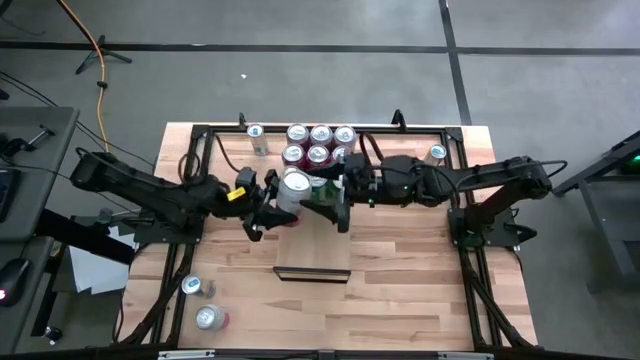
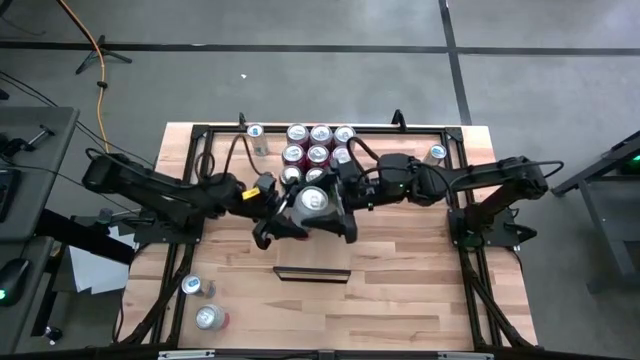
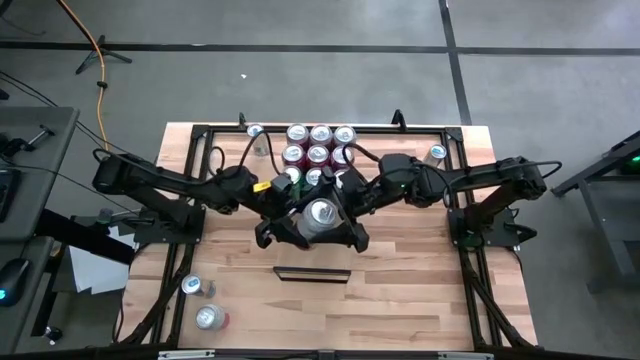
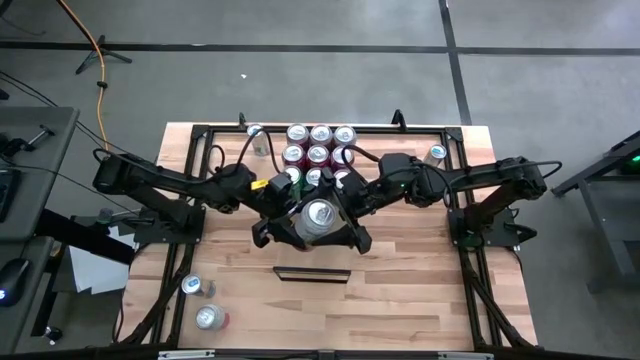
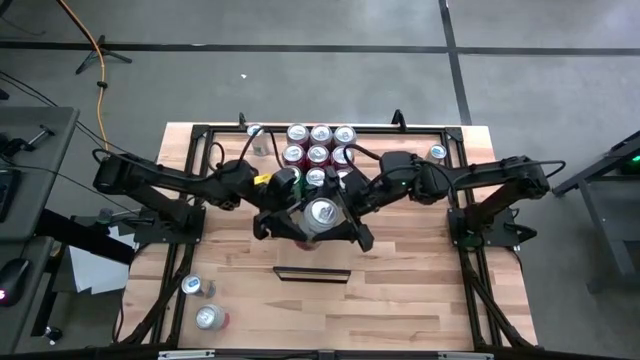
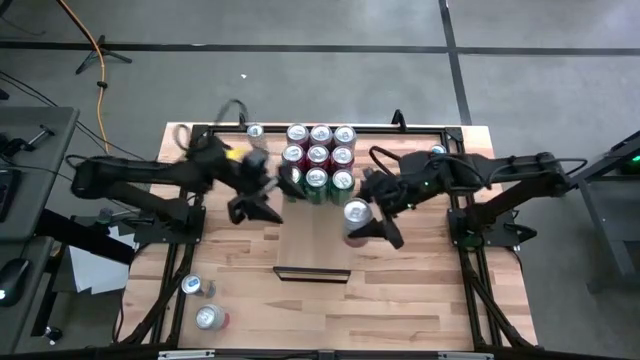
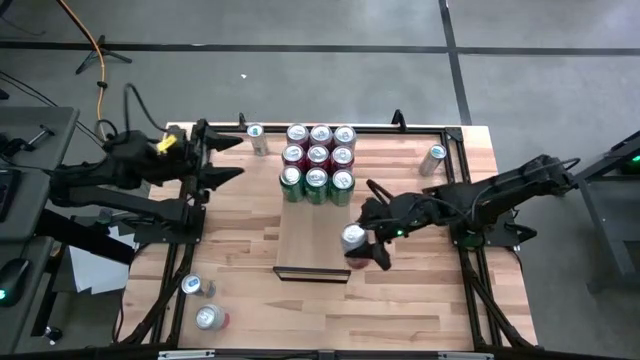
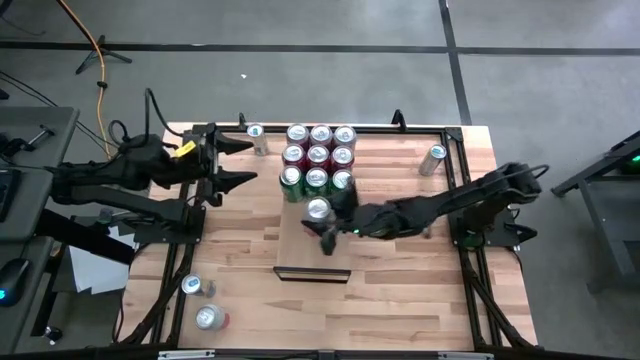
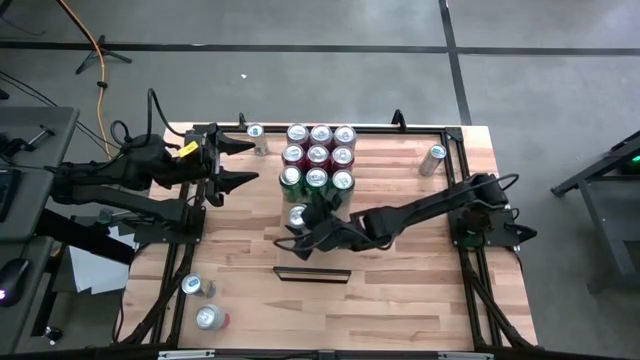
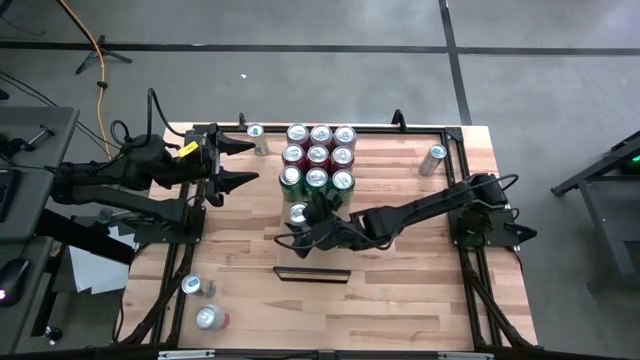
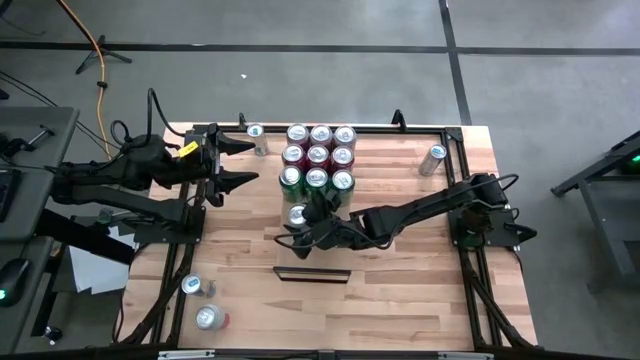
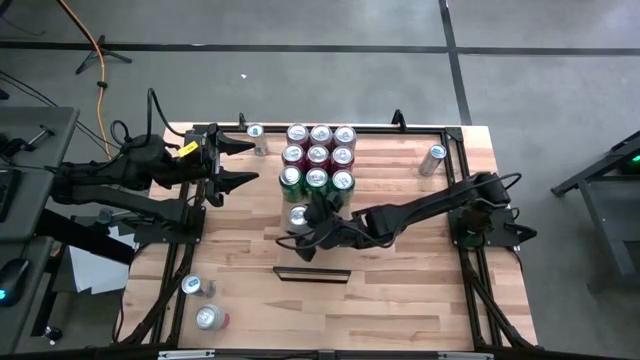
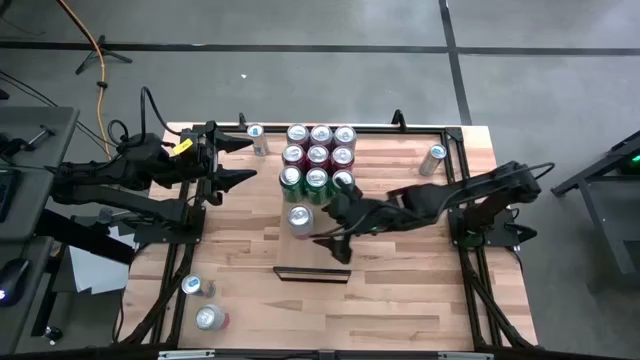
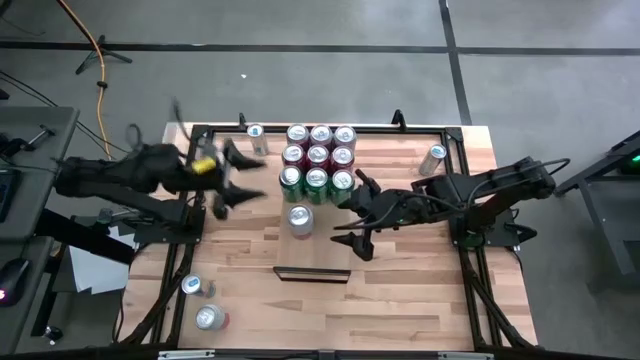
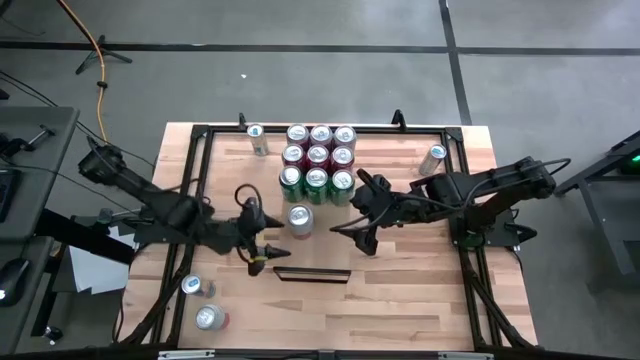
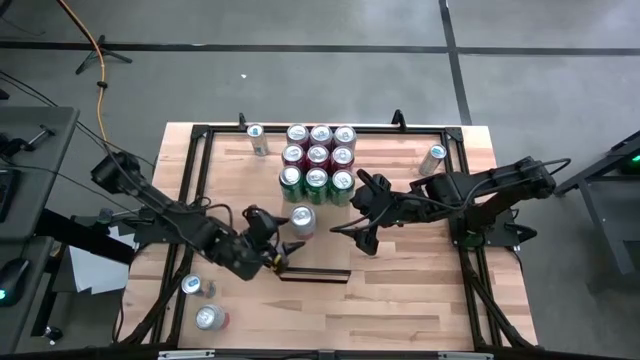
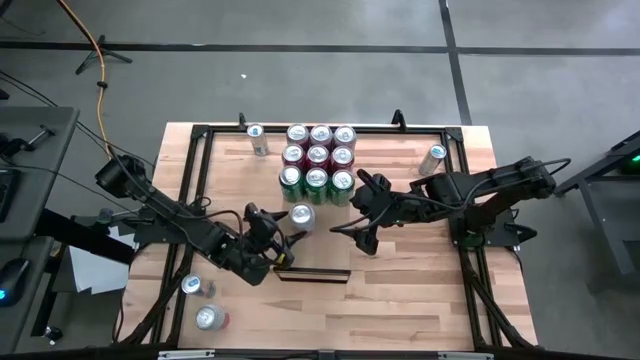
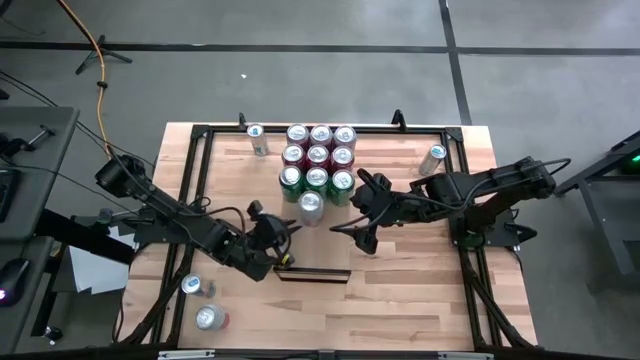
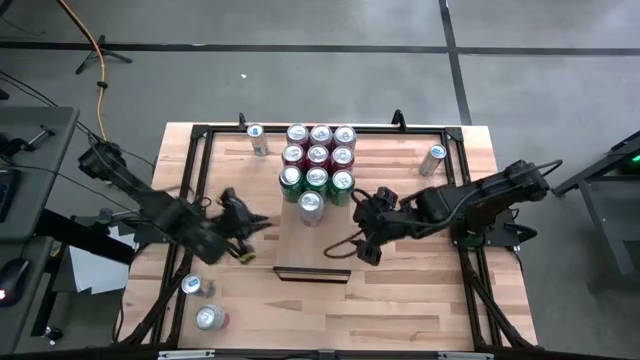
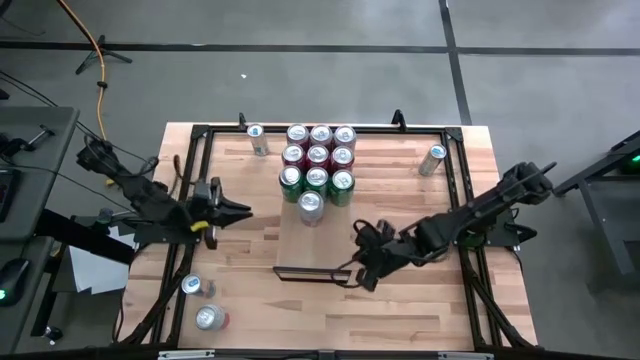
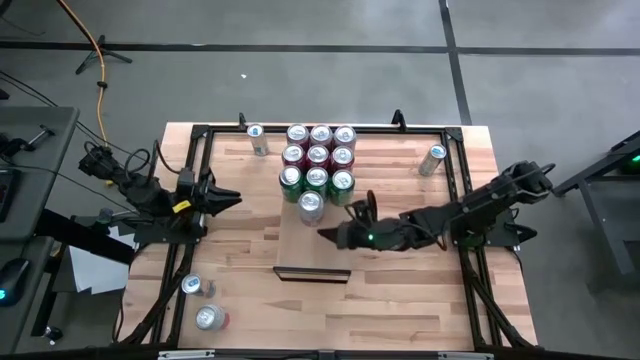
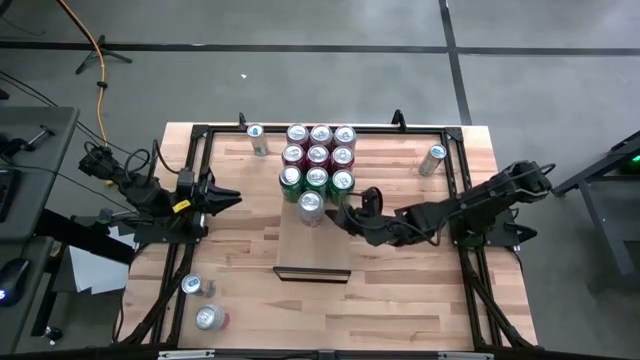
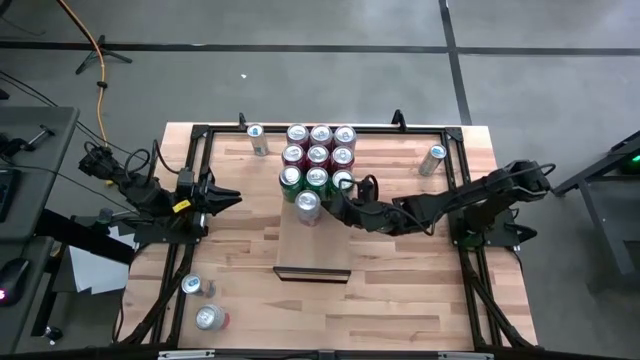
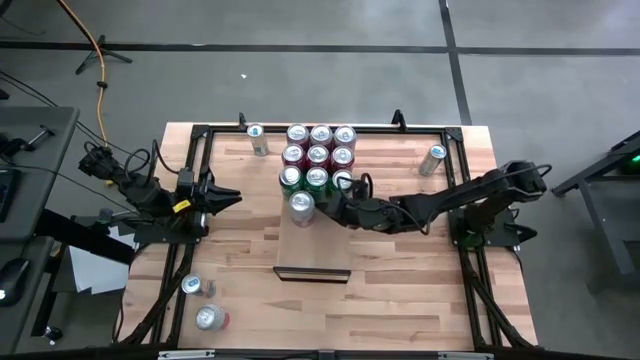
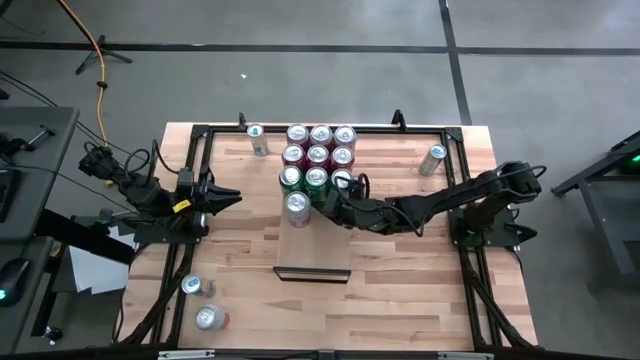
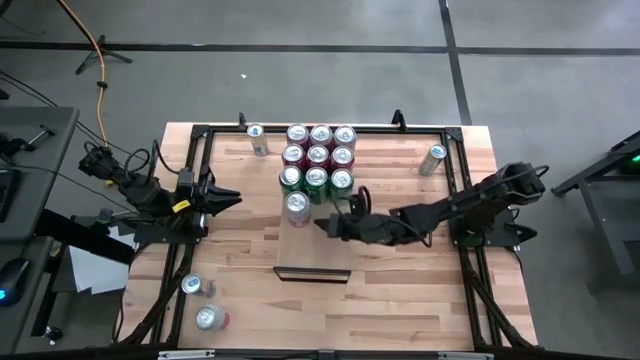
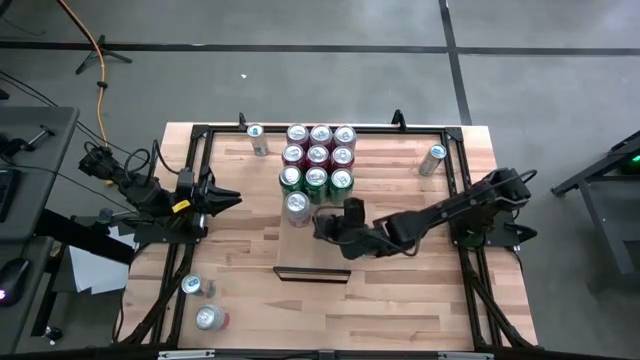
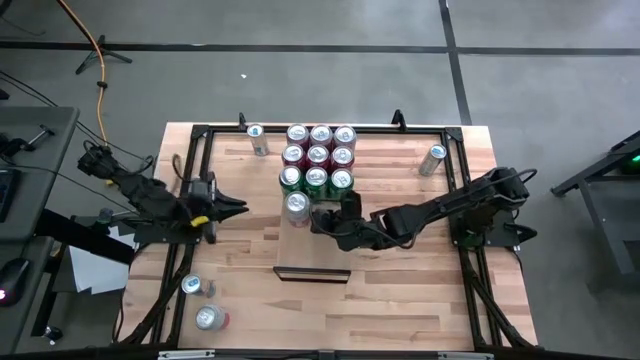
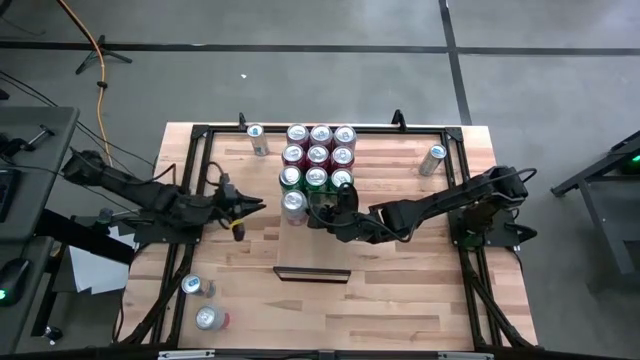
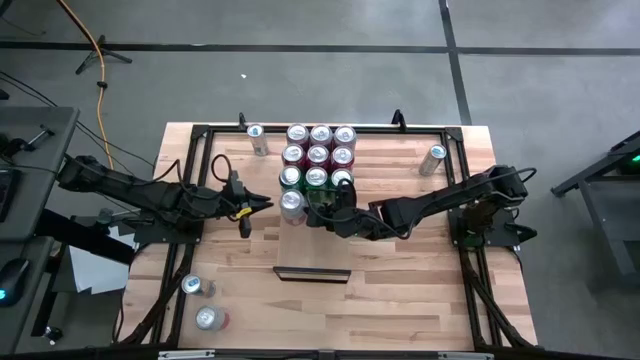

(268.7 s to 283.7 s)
Task: Place canned beverage on shelf
Put the bottom right pink white soda can on the shelf

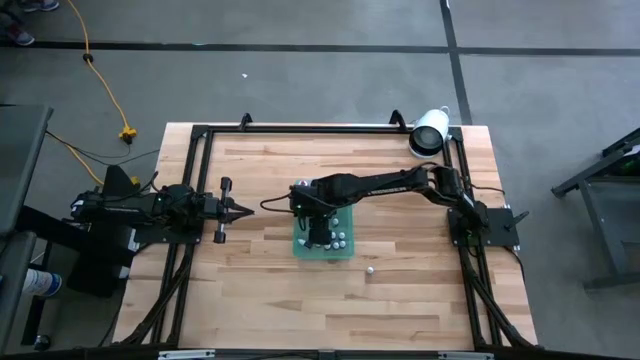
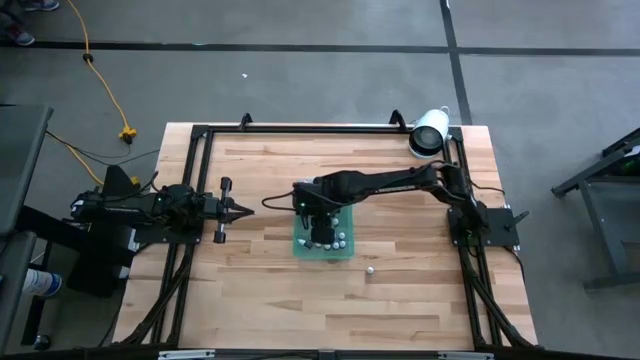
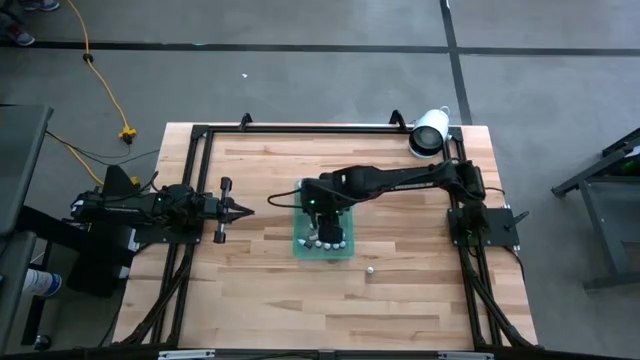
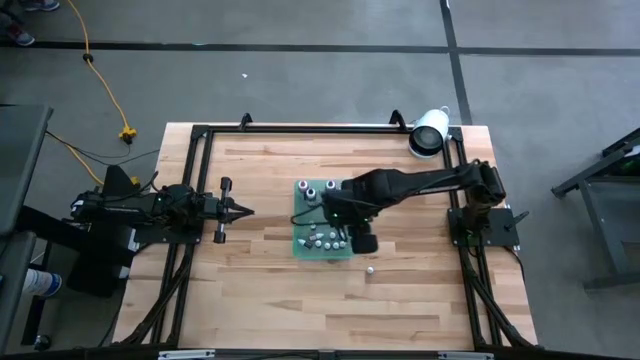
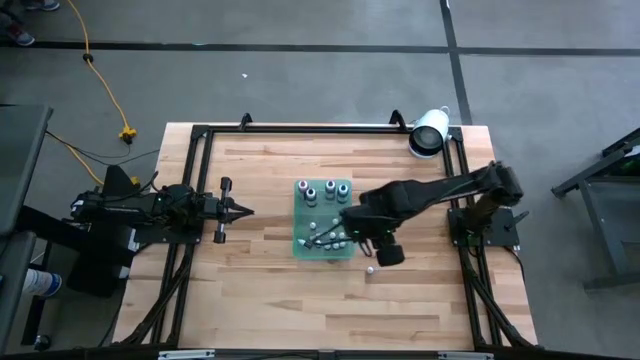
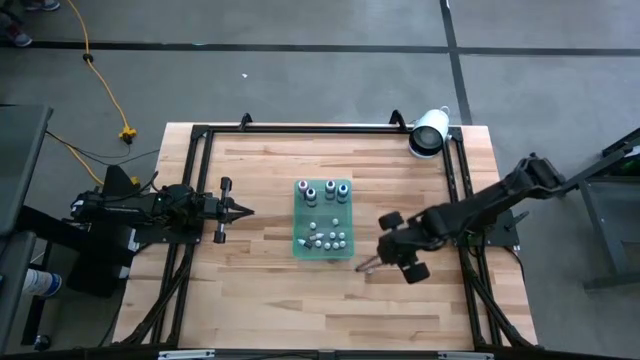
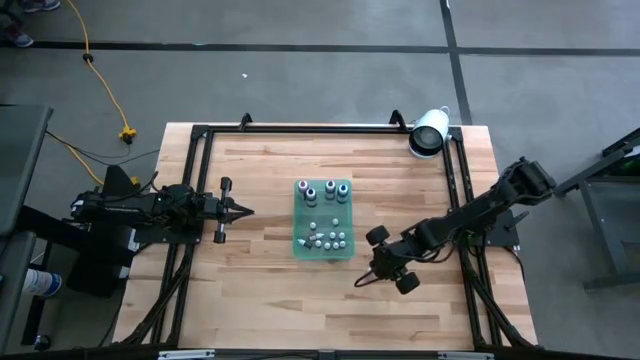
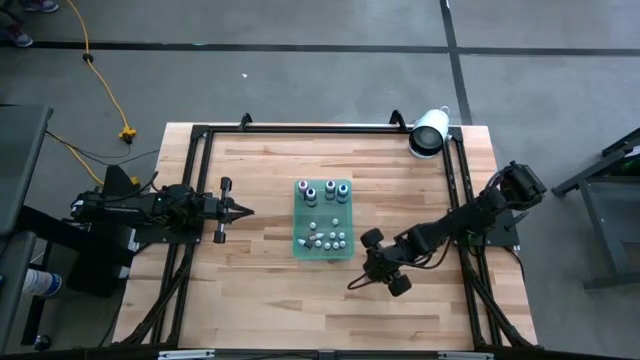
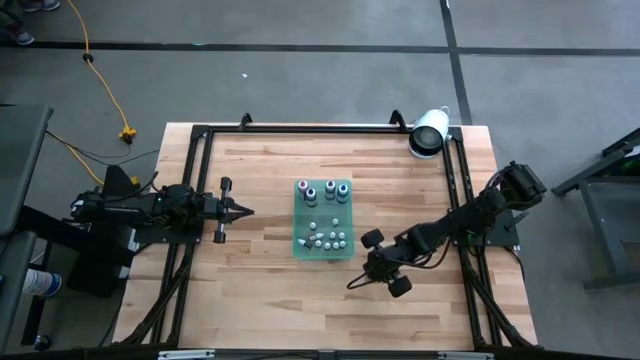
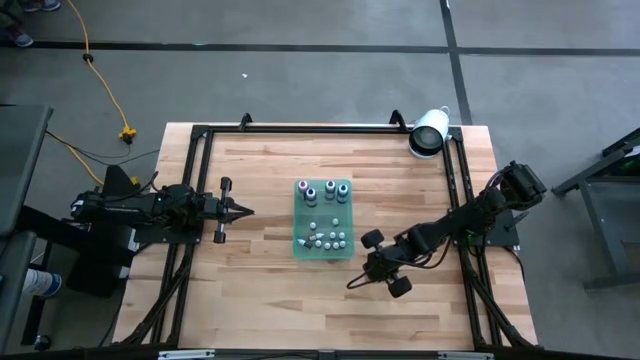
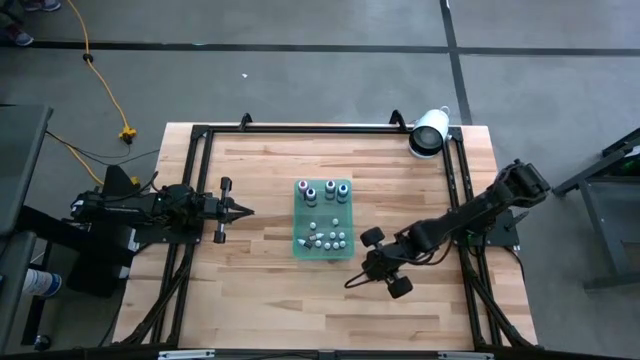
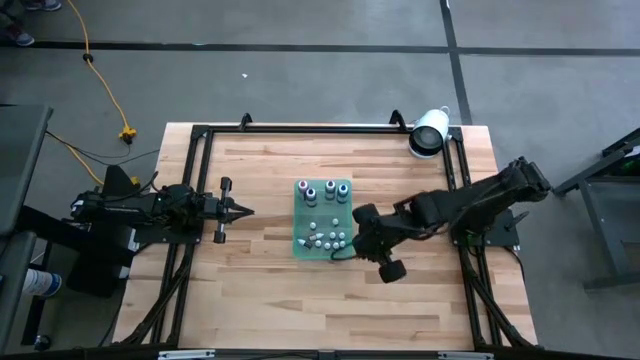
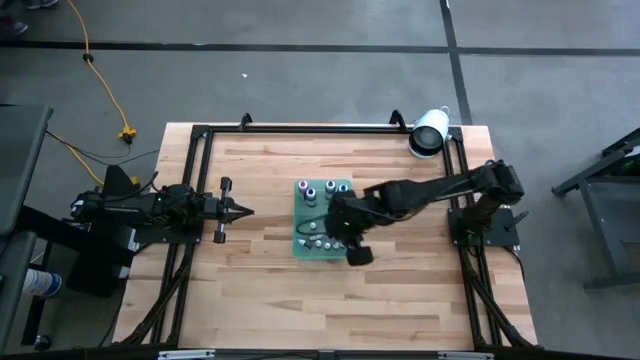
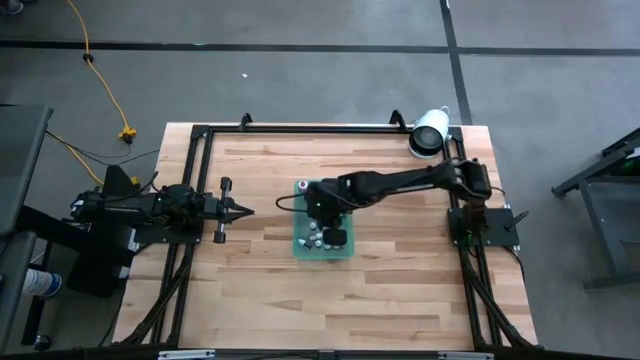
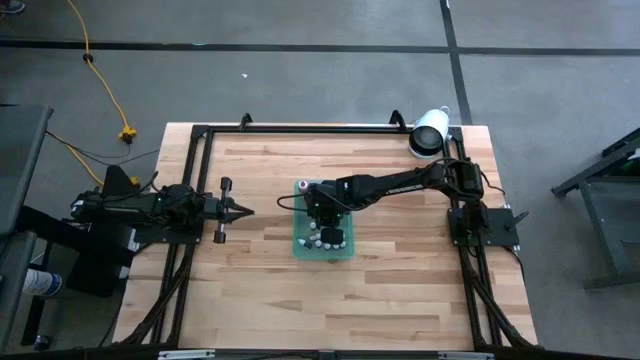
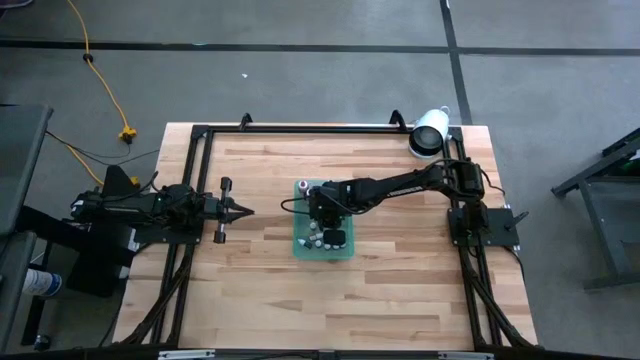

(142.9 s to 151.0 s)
Task: Pick & Place food coloring
Put the small light green food coloring bottle into the green bin
